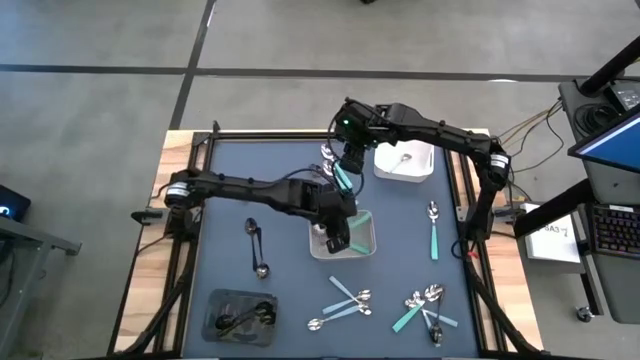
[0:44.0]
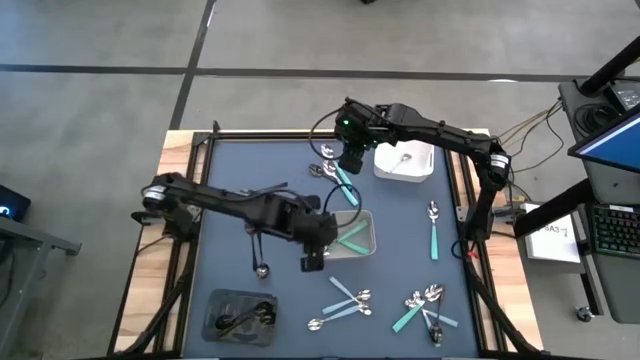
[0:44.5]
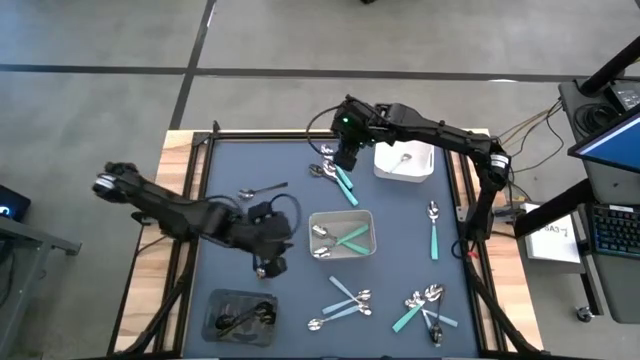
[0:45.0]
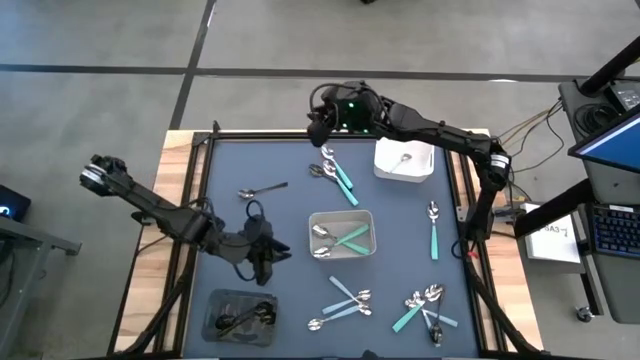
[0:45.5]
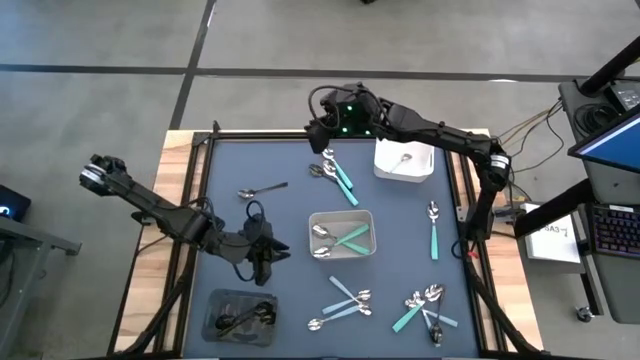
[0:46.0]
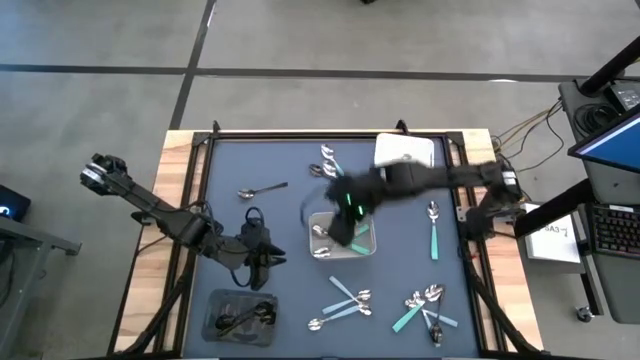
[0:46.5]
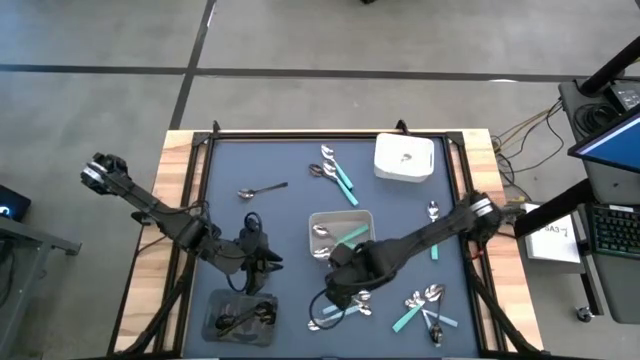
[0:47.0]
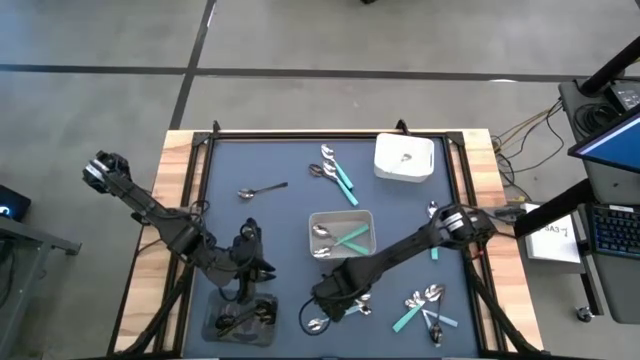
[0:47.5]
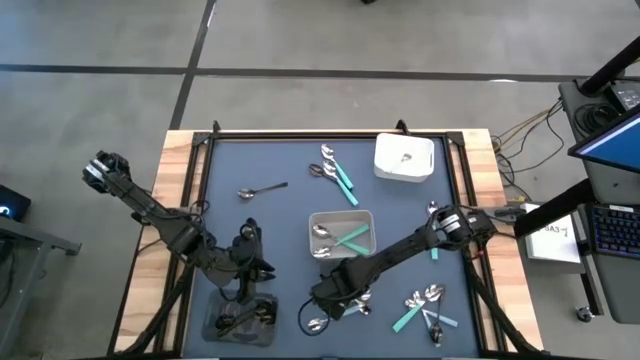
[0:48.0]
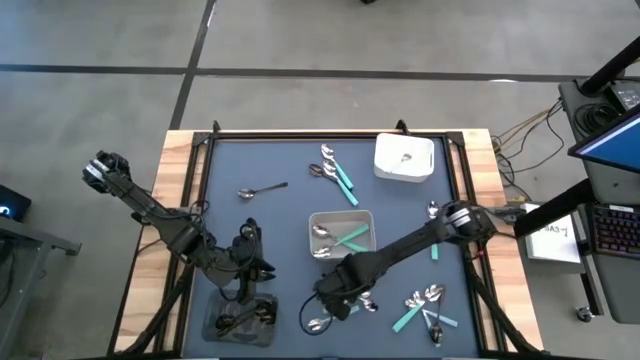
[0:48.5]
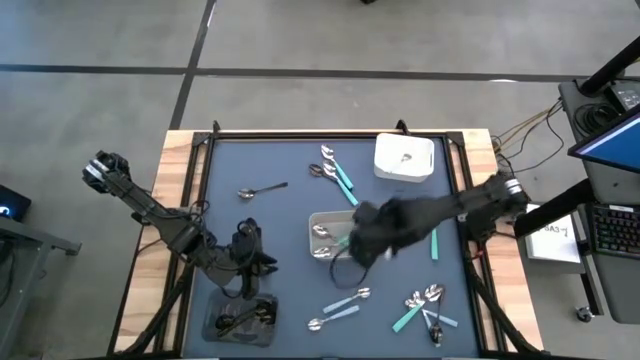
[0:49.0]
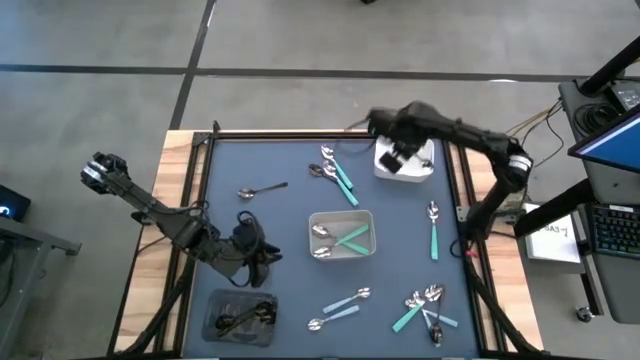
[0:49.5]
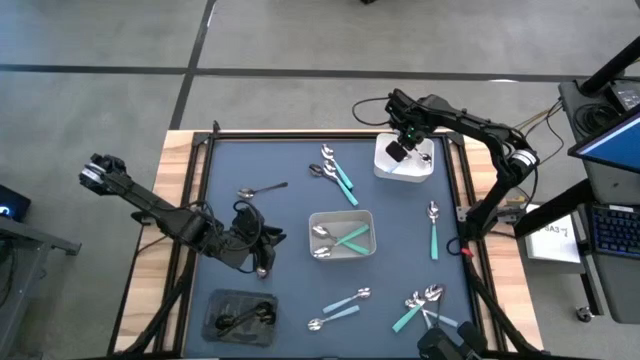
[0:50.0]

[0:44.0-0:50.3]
Task: Sort silverware by color (type)
Put the blue spoon into the white bin

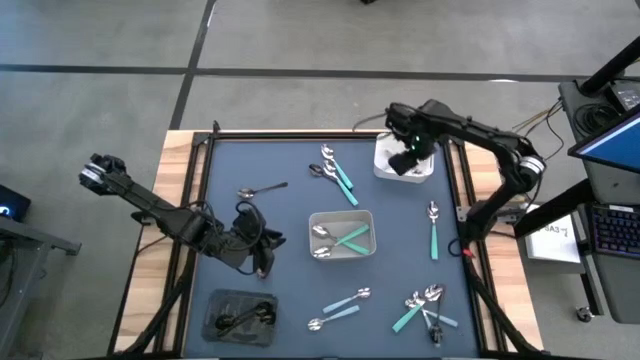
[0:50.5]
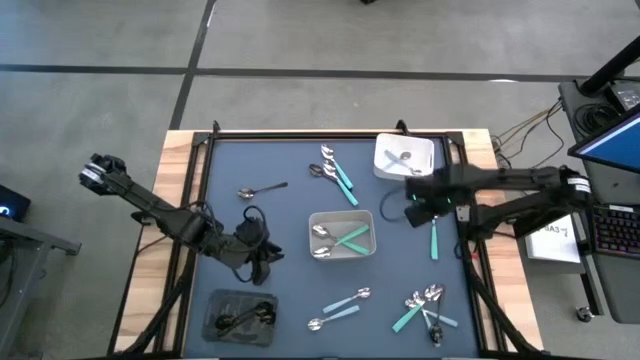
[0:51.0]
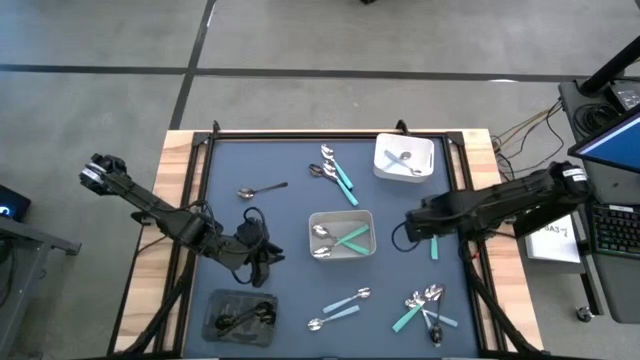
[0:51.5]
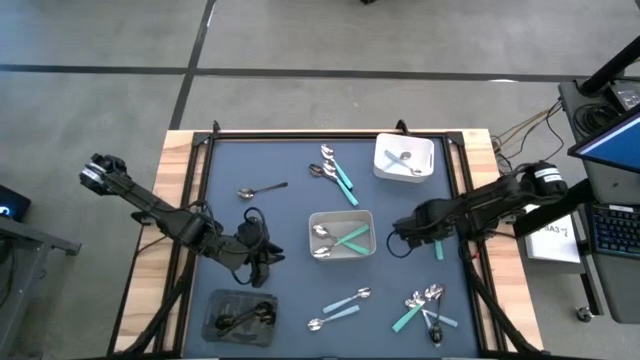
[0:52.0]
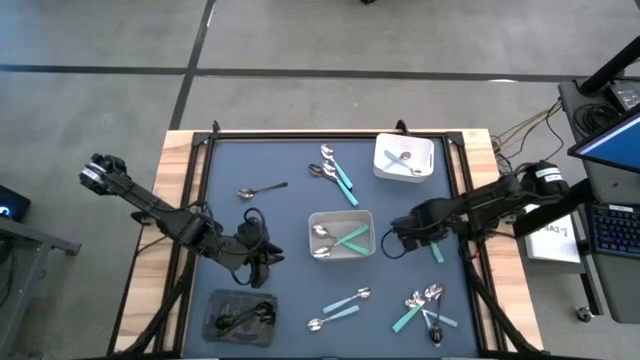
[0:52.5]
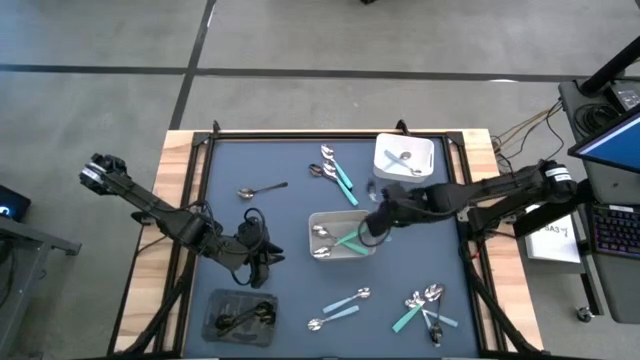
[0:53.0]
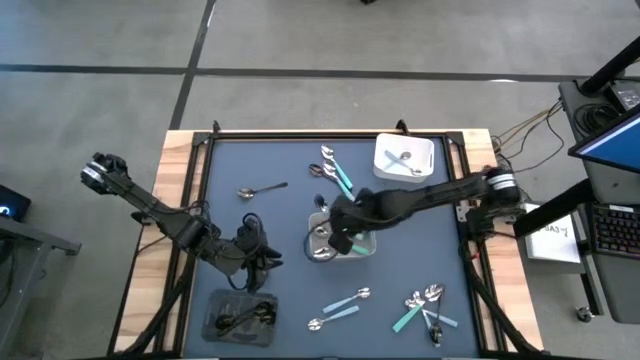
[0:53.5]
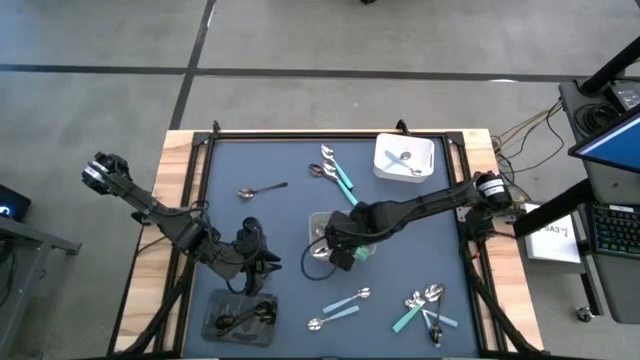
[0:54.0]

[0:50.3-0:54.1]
Put the green spoon into the gray bin

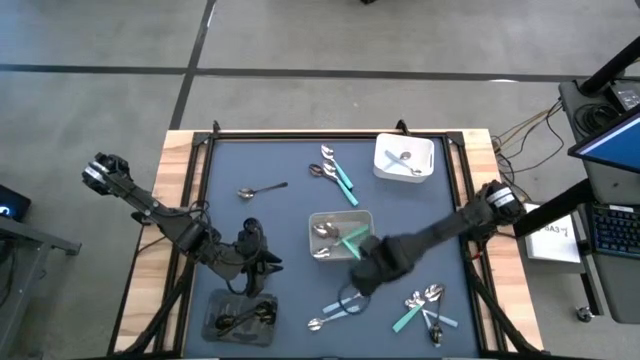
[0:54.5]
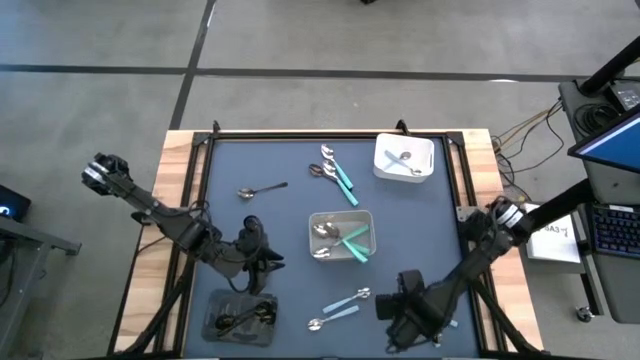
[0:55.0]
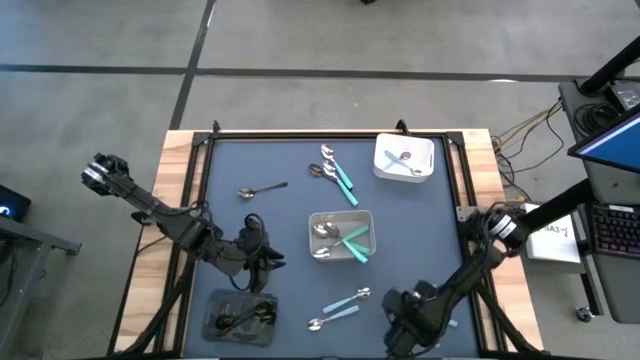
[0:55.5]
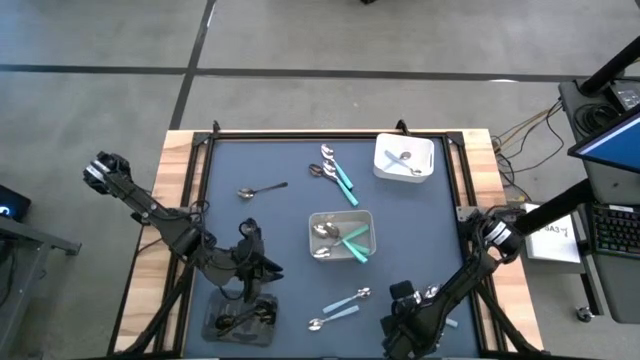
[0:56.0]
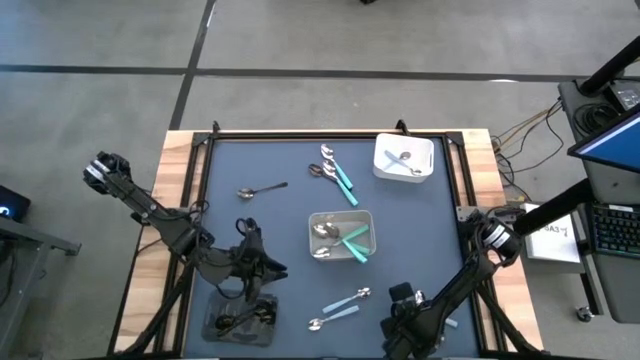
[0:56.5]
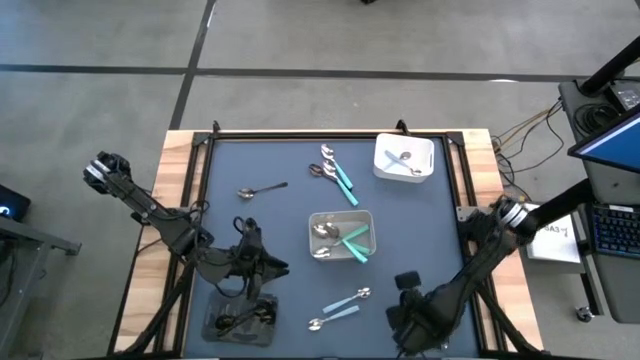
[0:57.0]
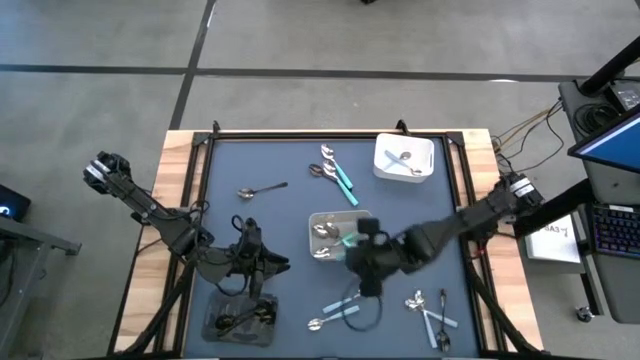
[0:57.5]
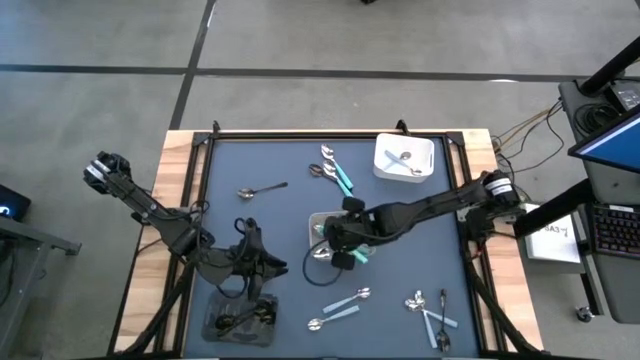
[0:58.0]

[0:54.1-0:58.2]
Put the green spoon into the gray bin

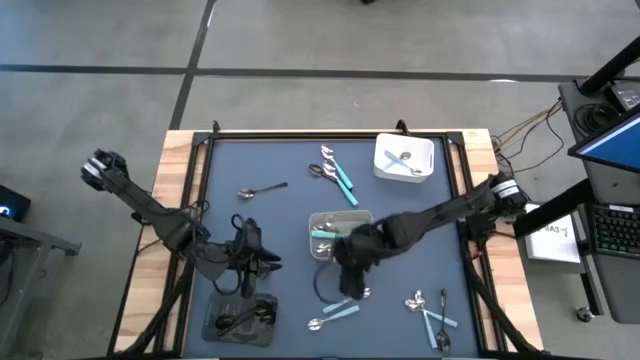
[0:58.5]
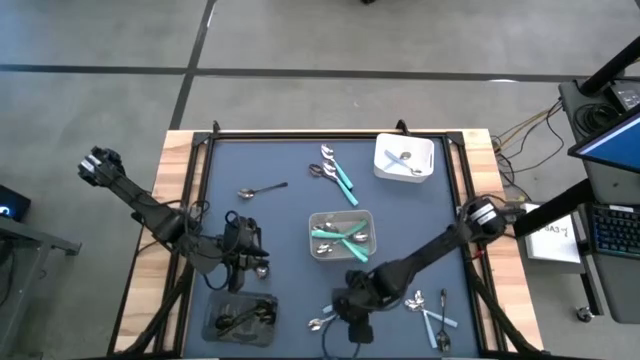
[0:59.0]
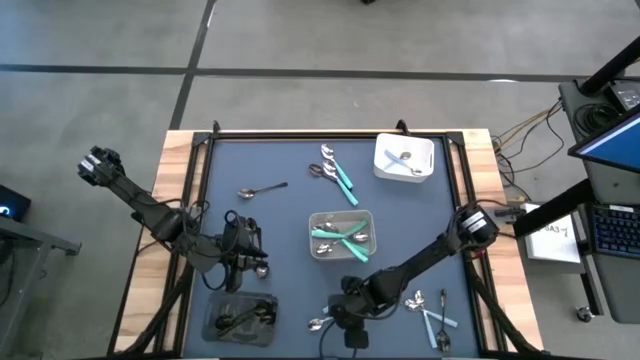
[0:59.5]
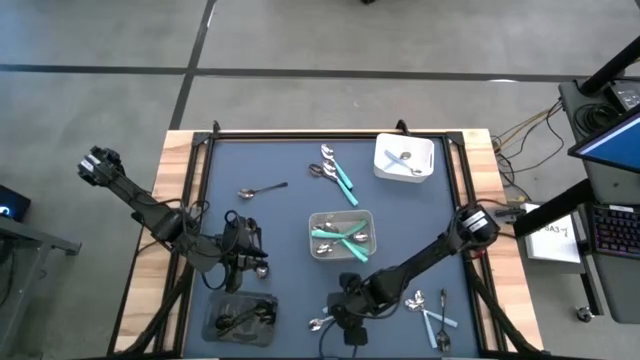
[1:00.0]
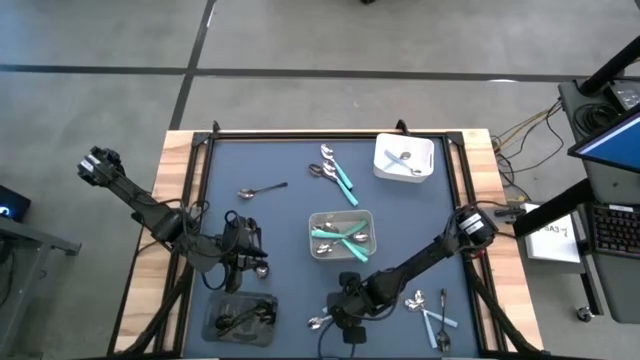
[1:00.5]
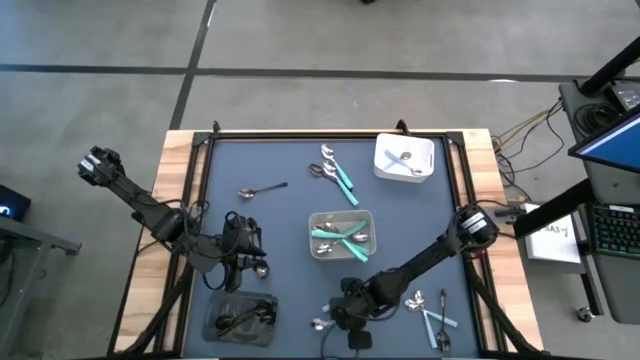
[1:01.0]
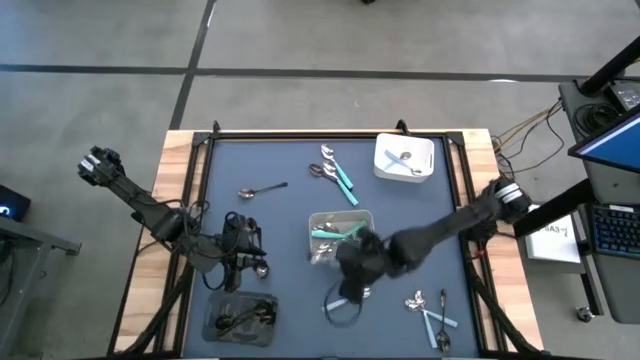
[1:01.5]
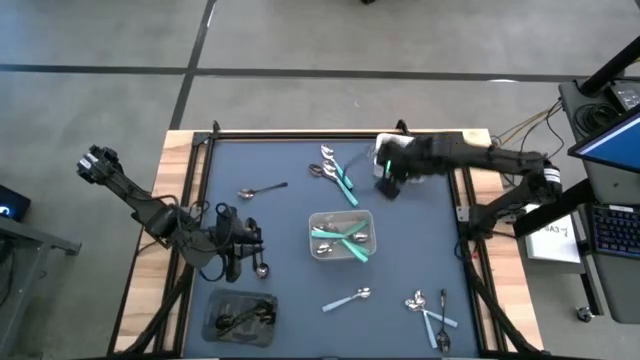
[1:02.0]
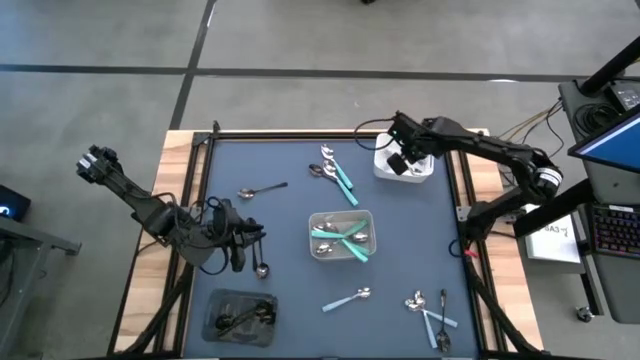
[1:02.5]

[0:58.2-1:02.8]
Put the blue spoon into the white bin

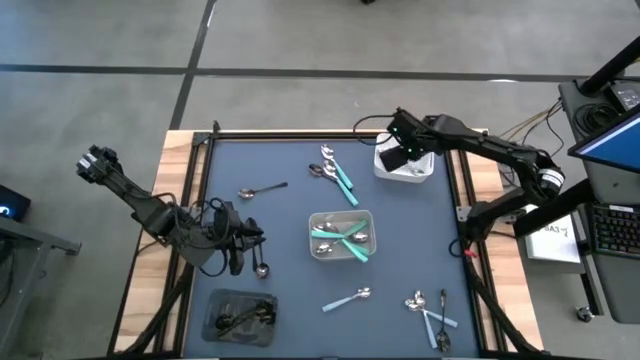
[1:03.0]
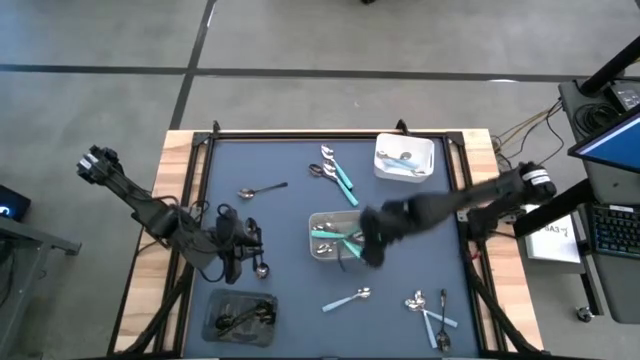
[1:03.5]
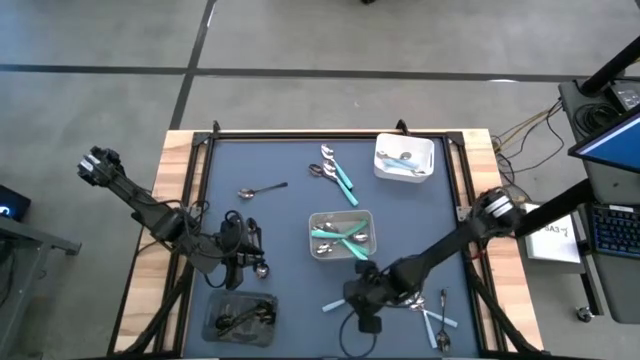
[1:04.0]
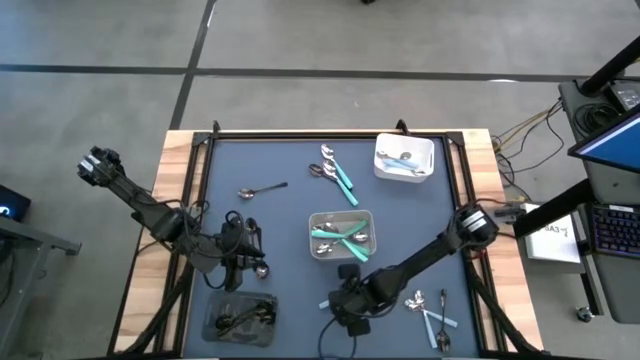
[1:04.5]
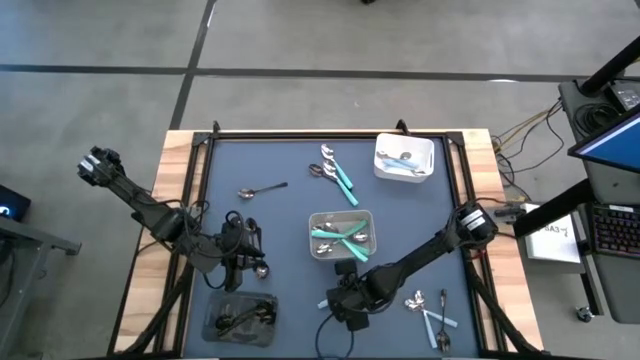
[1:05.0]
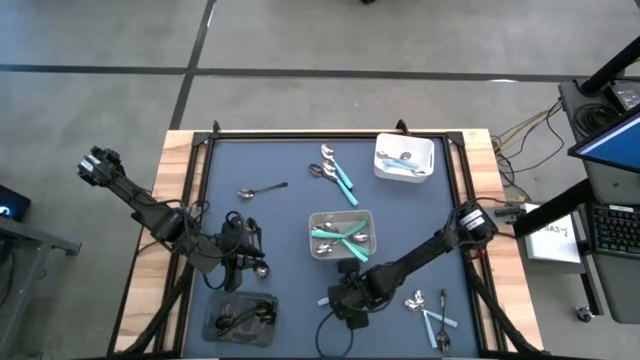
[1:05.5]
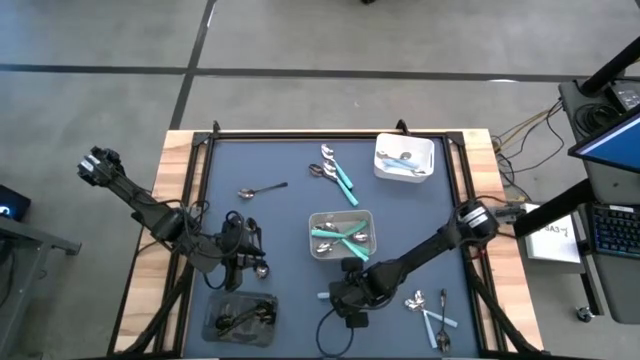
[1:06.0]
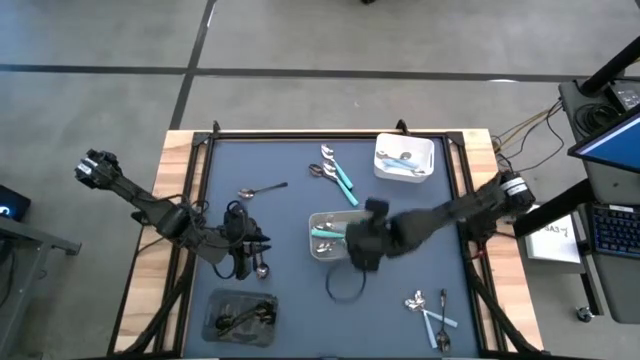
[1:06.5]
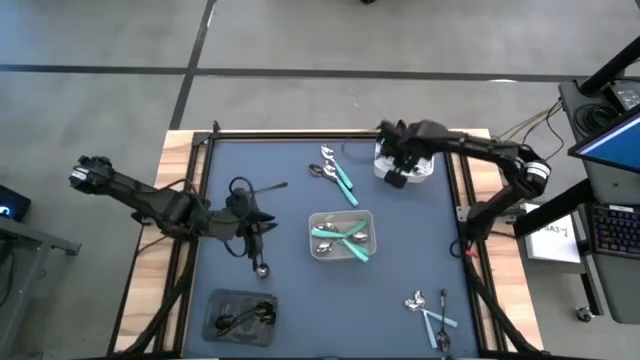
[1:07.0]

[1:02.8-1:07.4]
Put the blue spoon into the white bin
